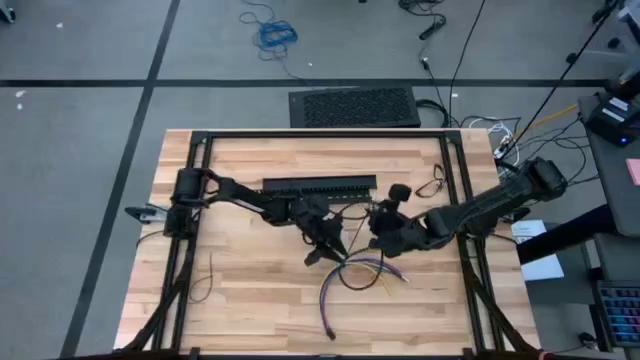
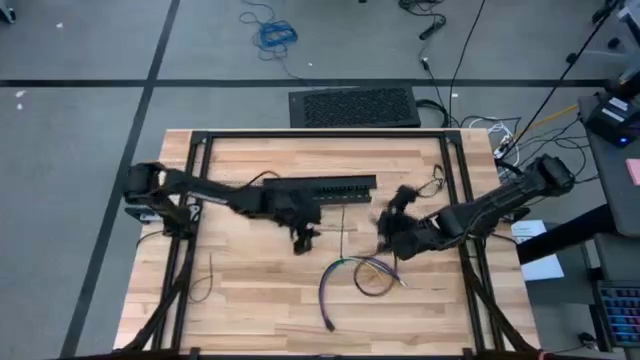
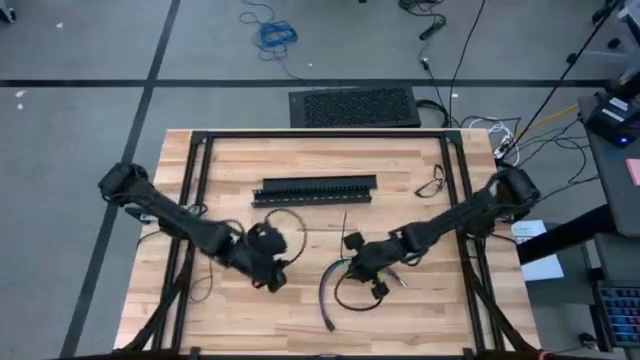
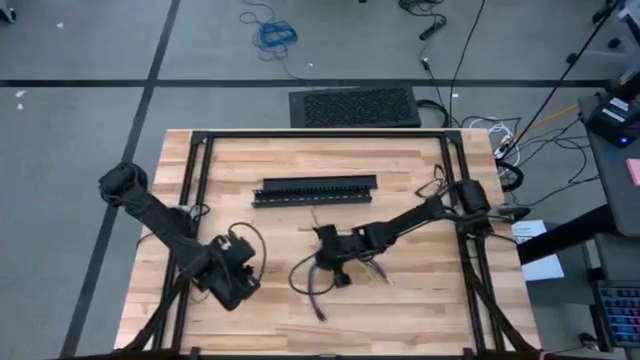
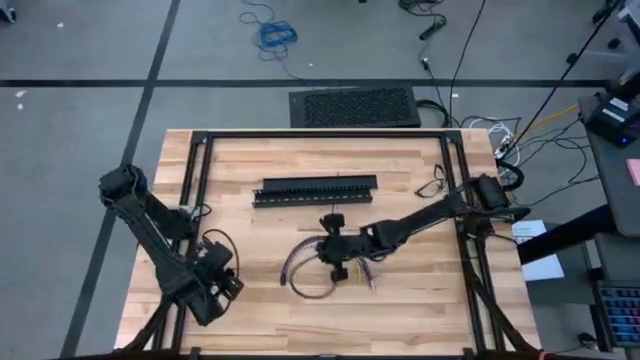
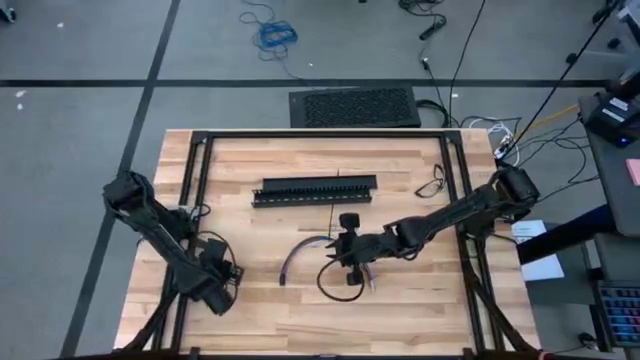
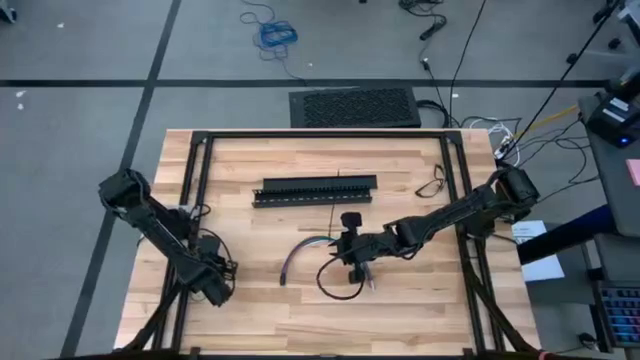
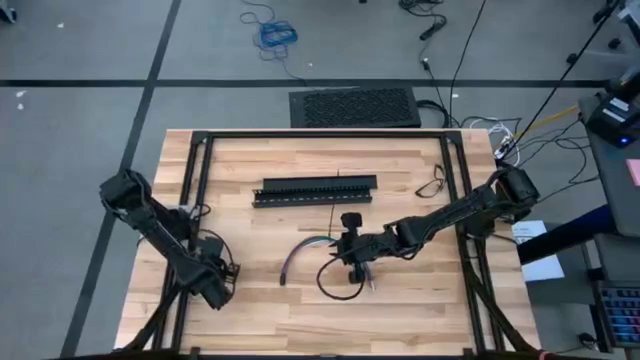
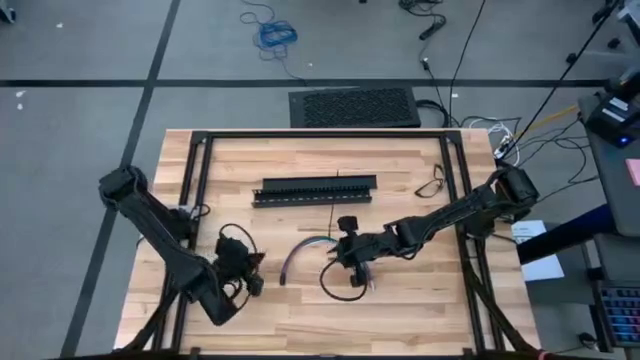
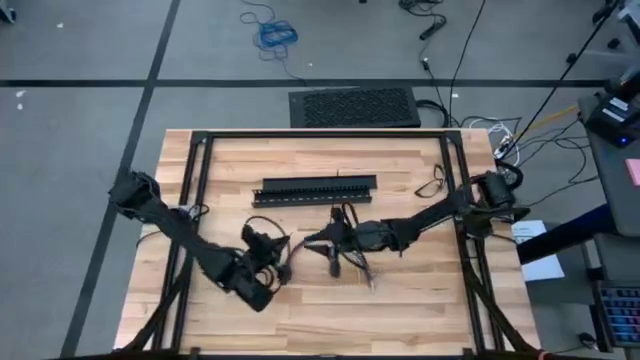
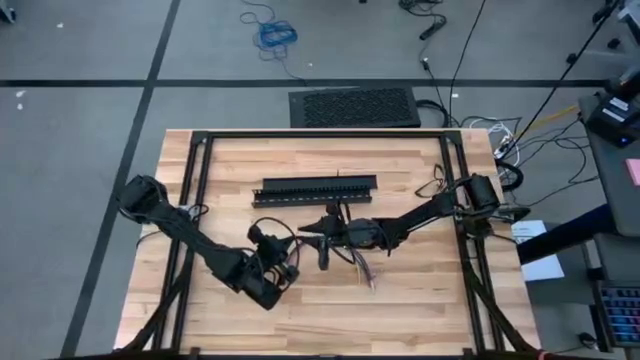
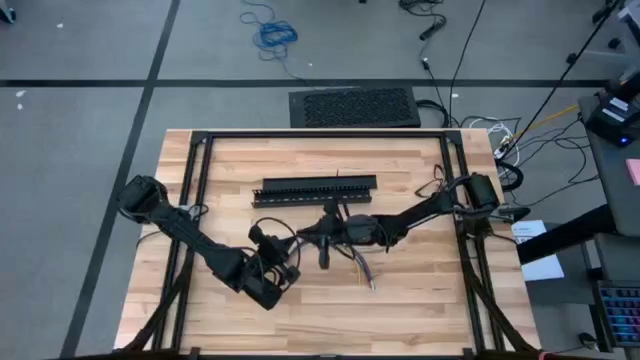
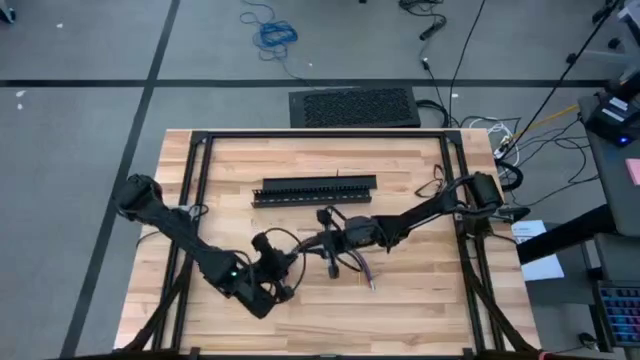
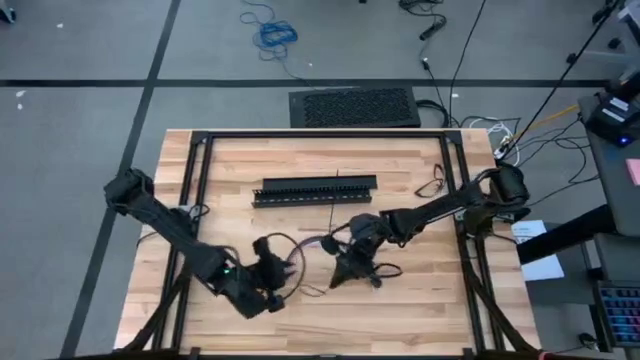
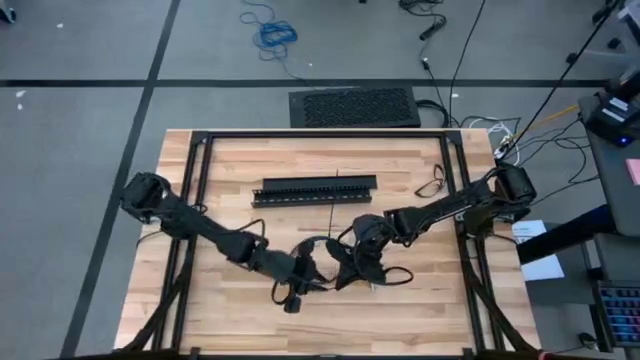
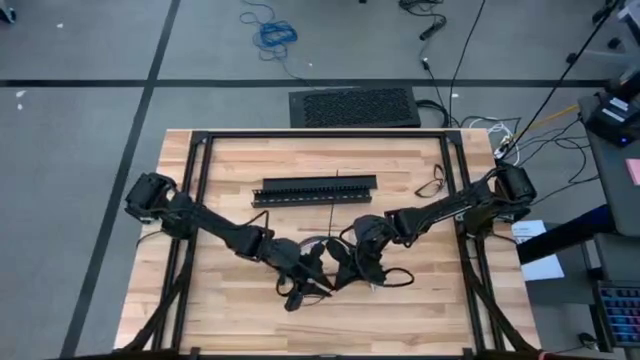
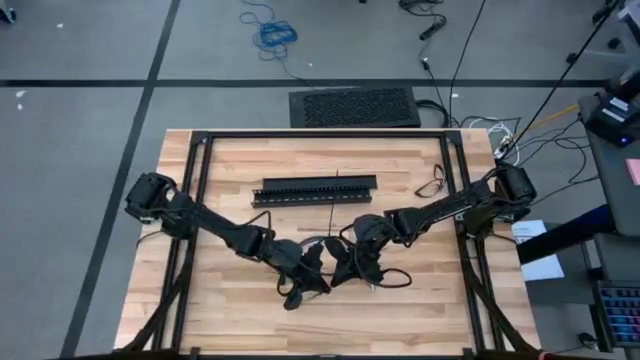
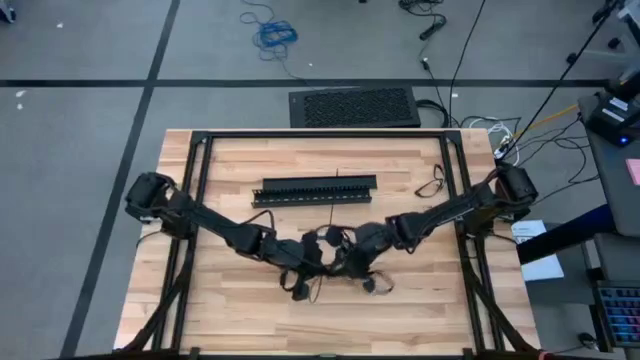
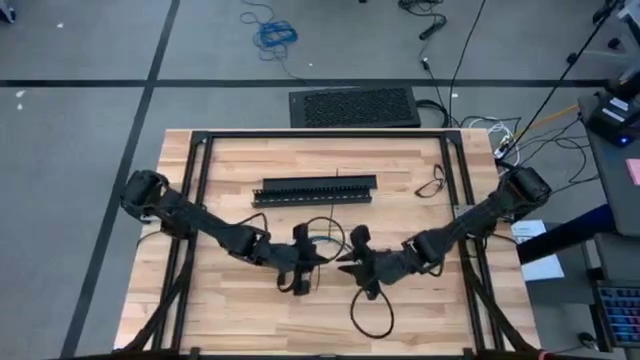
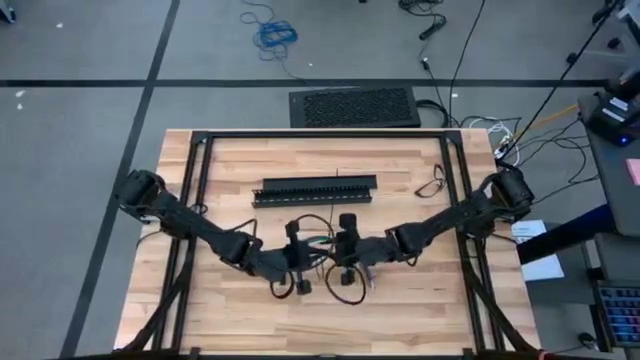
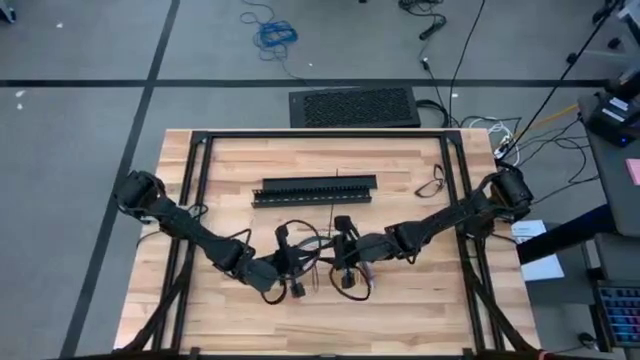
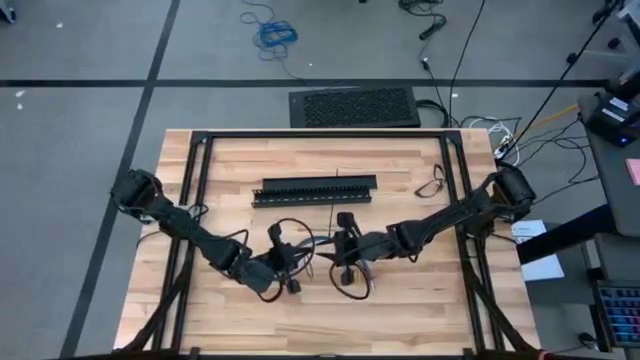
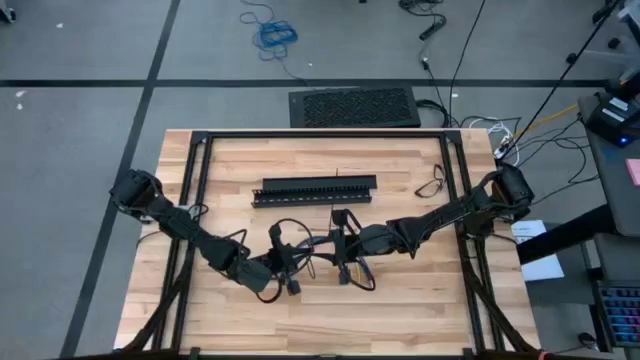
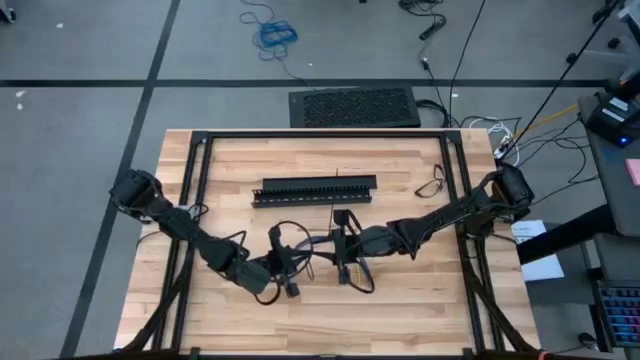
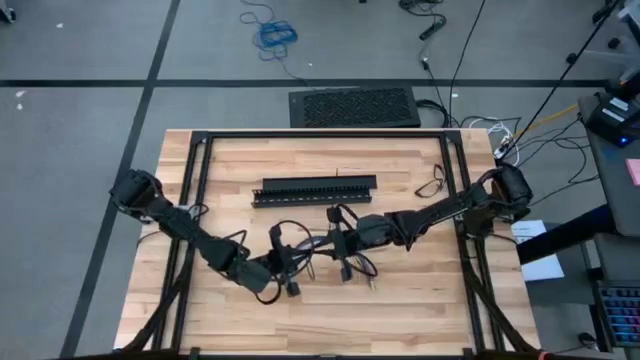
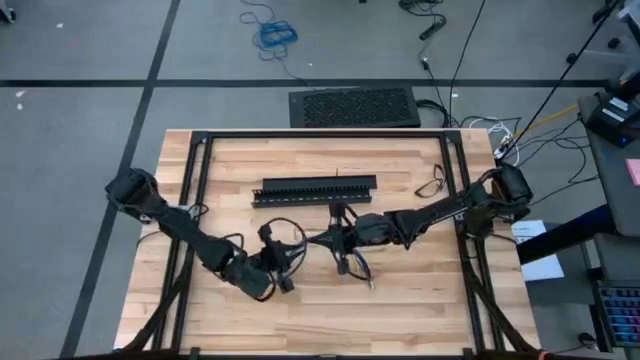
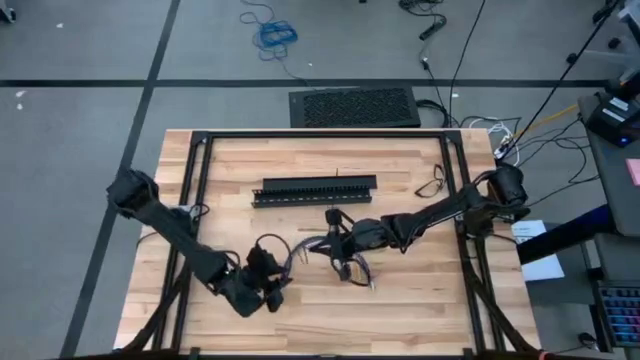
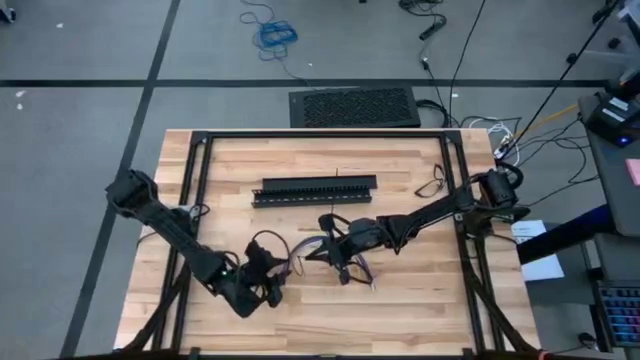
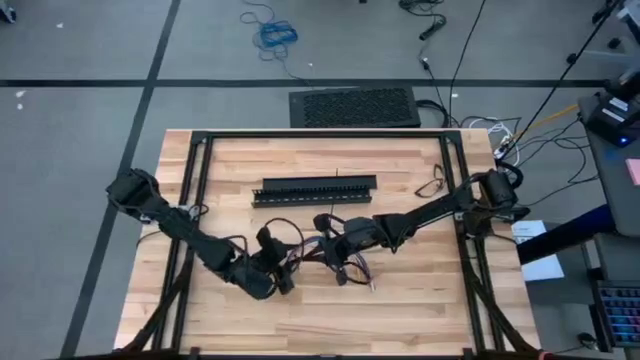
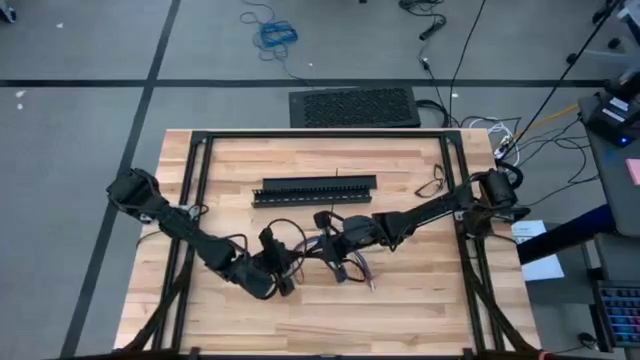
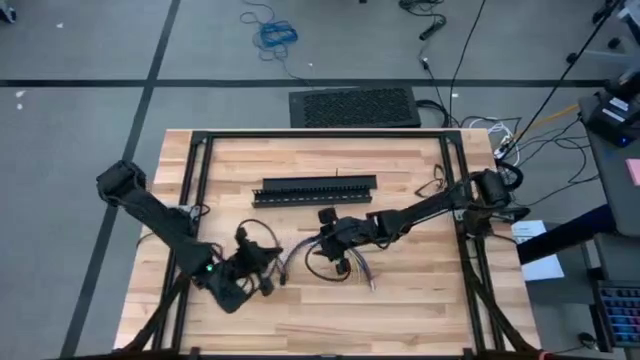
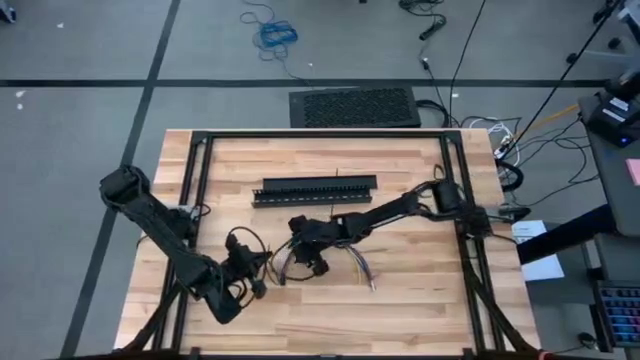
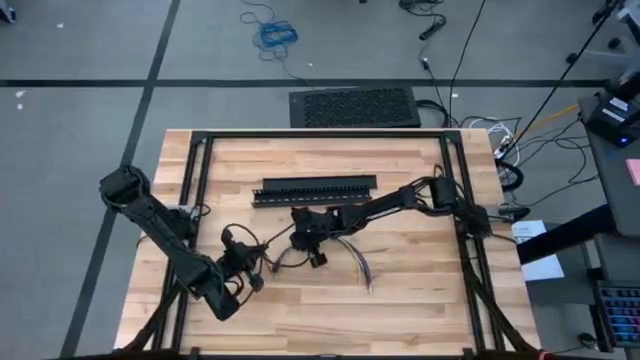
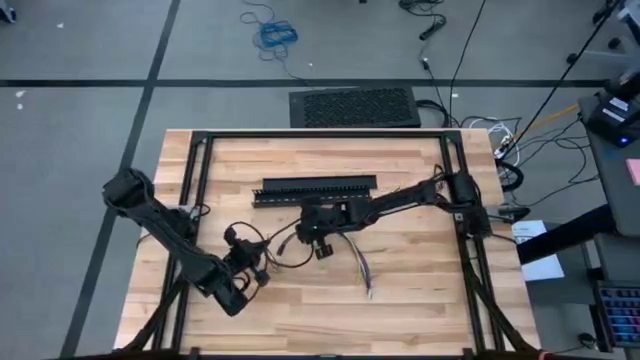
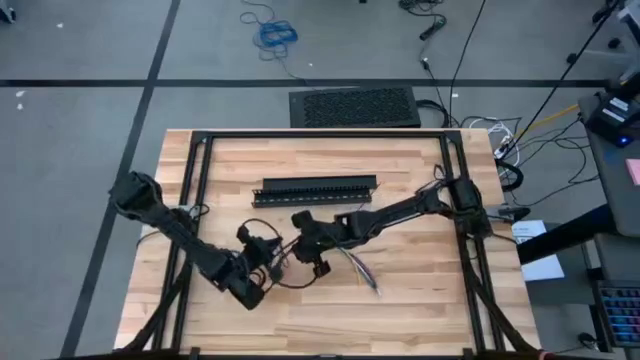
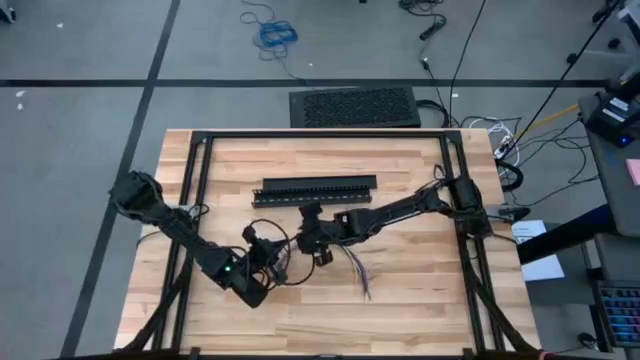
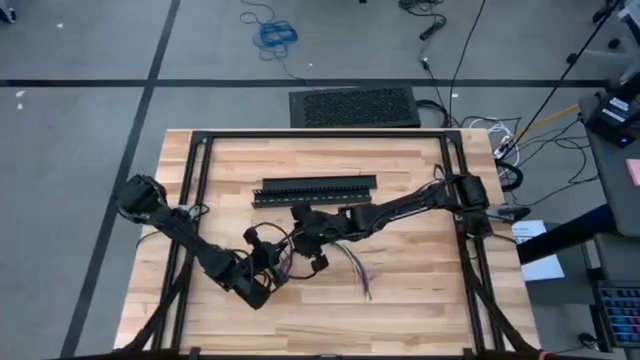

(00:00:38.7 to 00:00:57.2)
Task: Ziptie cables
Wrap the cables together using a zip tie

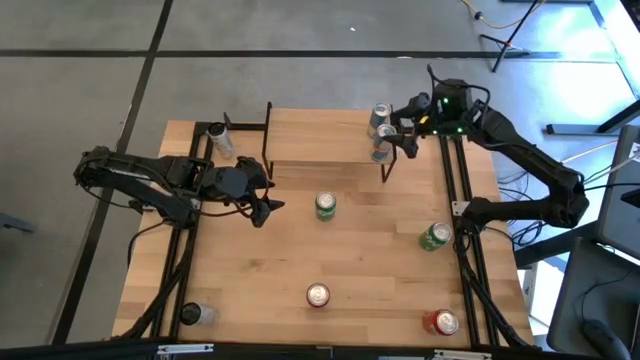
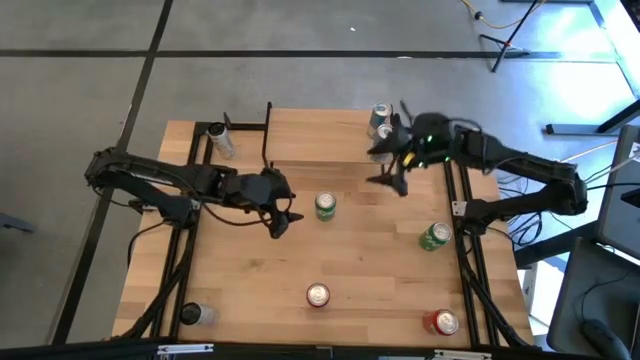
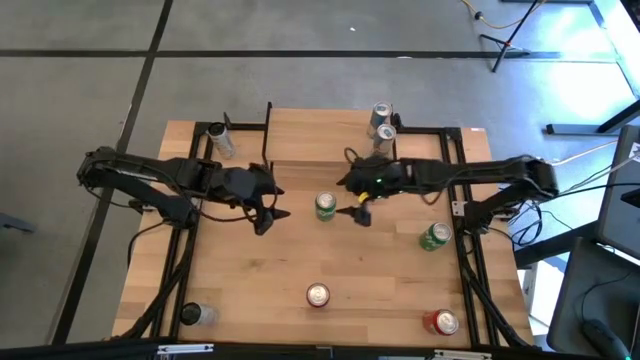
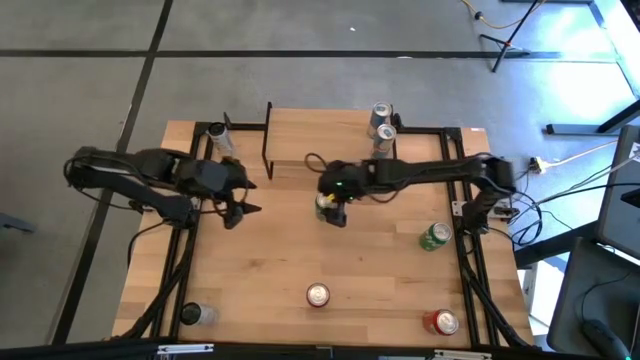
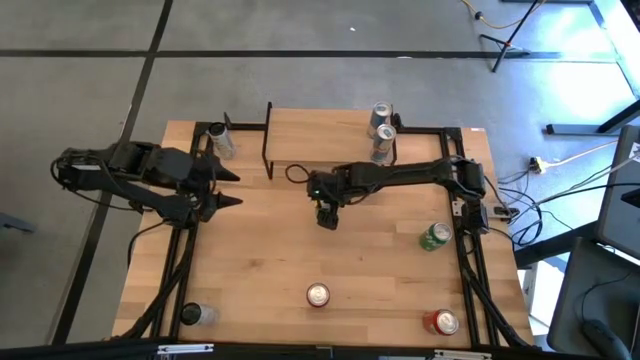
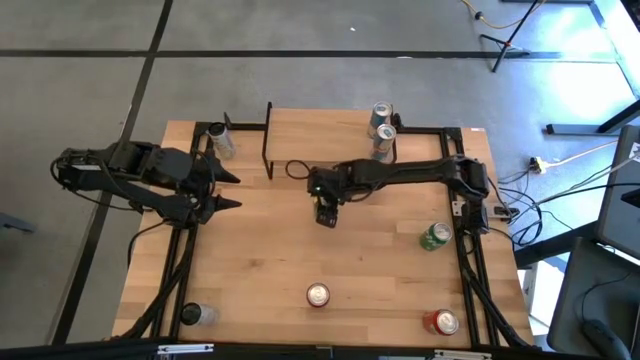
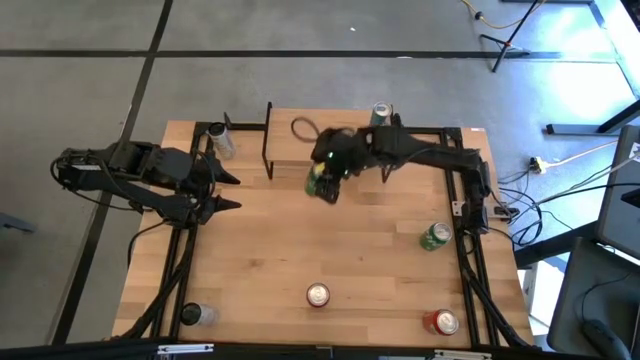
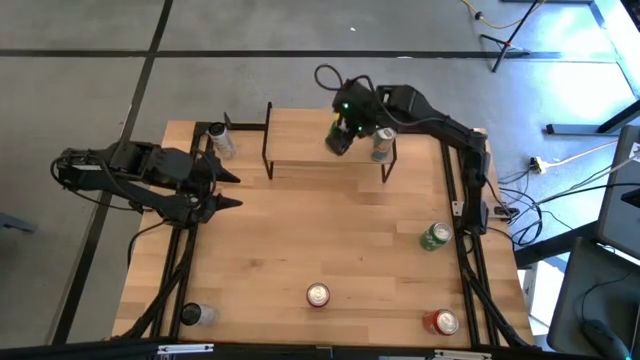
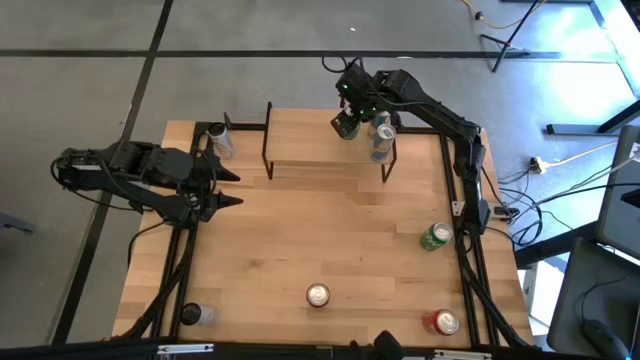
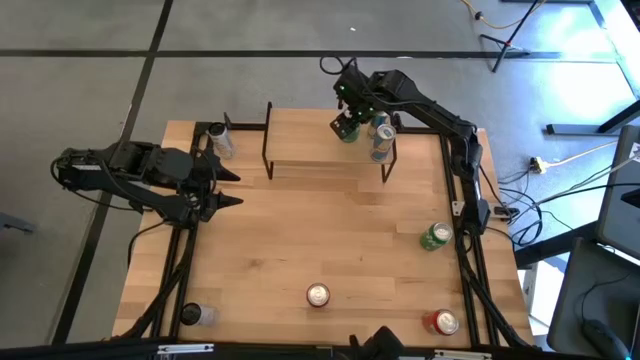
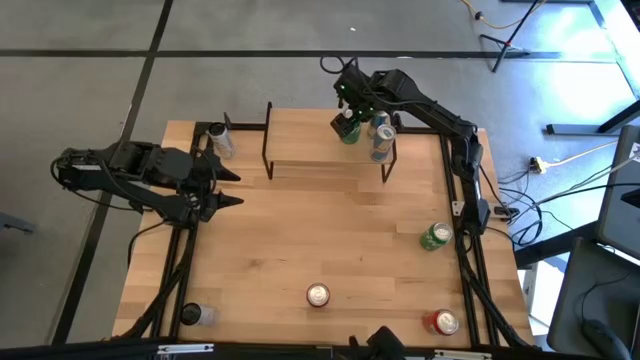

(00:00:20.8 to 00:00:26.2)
Task: Place canned beverage on shelf
Put the top green soda can on the shelf
